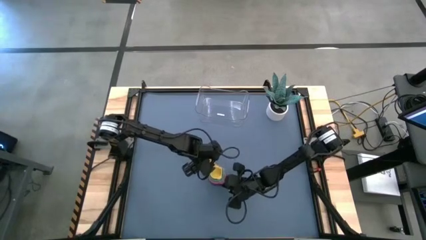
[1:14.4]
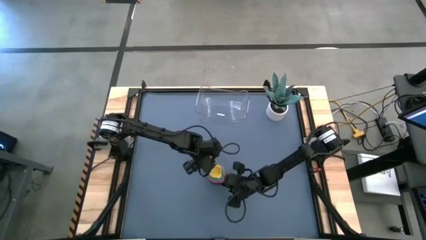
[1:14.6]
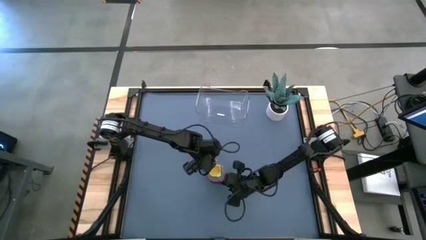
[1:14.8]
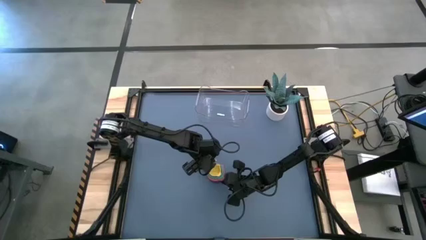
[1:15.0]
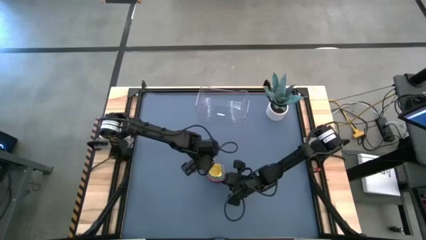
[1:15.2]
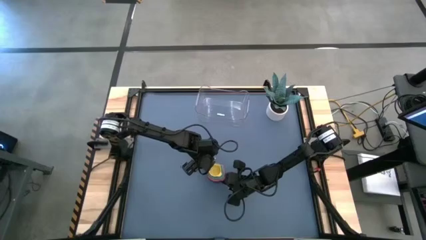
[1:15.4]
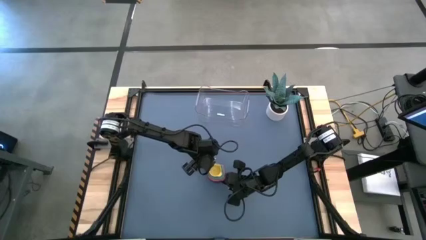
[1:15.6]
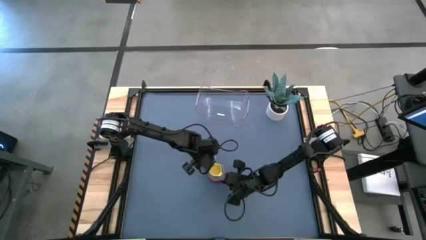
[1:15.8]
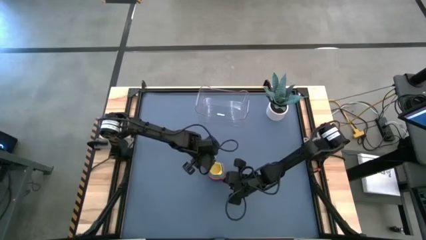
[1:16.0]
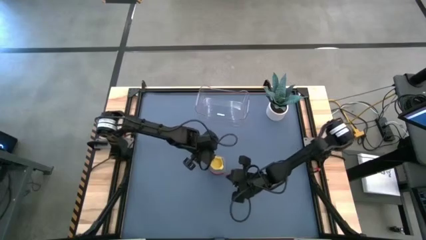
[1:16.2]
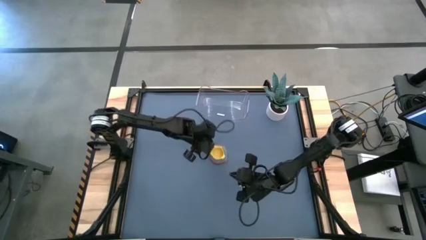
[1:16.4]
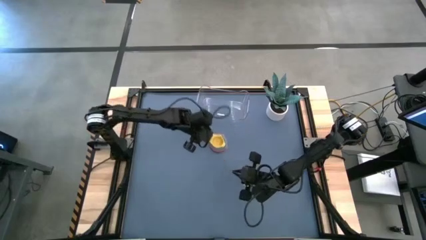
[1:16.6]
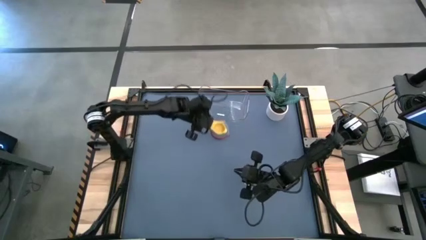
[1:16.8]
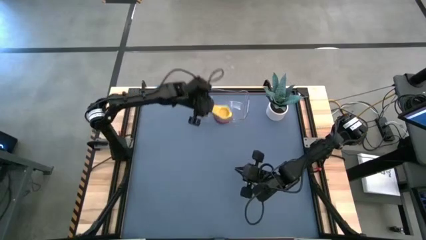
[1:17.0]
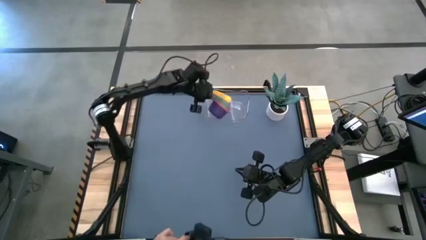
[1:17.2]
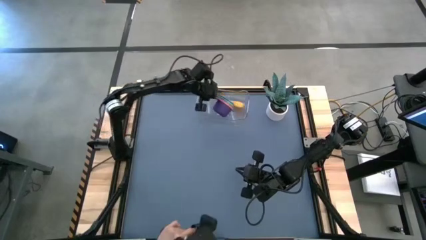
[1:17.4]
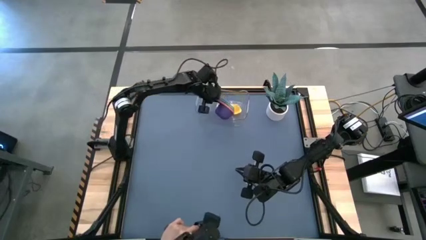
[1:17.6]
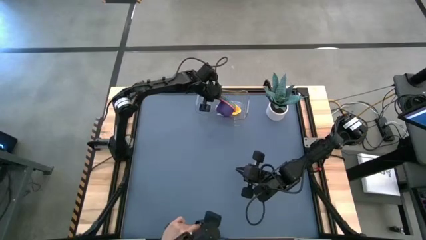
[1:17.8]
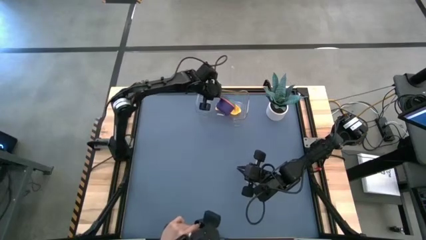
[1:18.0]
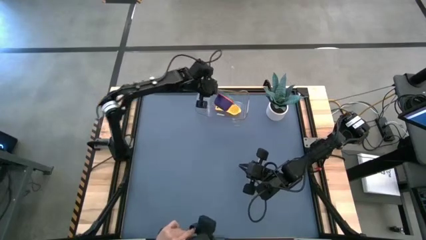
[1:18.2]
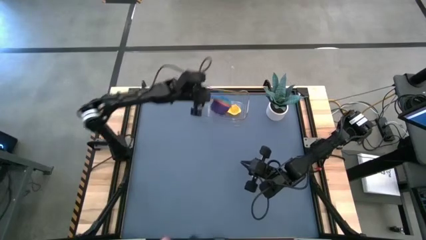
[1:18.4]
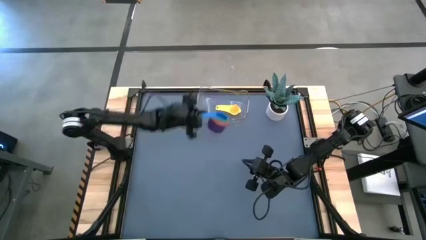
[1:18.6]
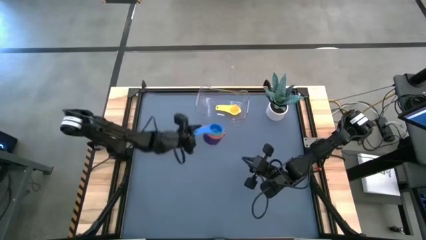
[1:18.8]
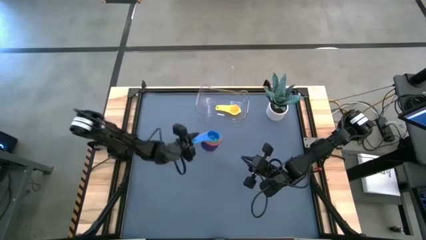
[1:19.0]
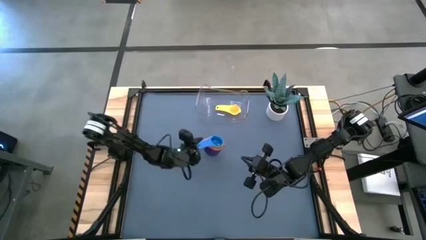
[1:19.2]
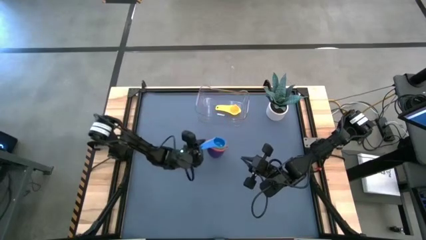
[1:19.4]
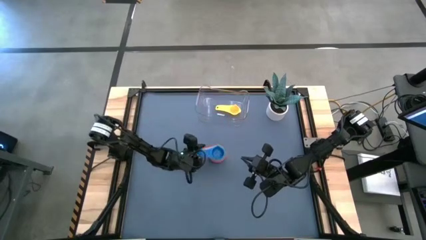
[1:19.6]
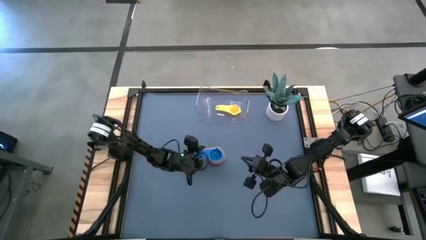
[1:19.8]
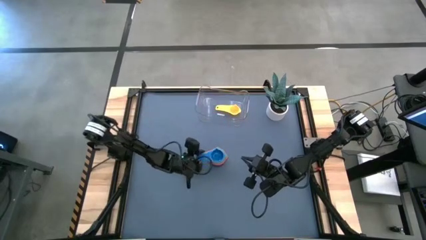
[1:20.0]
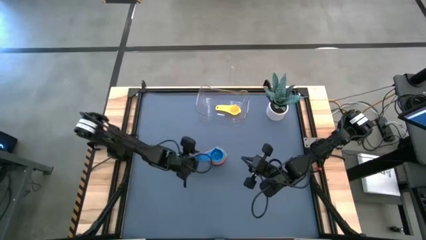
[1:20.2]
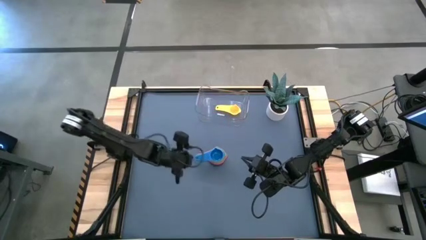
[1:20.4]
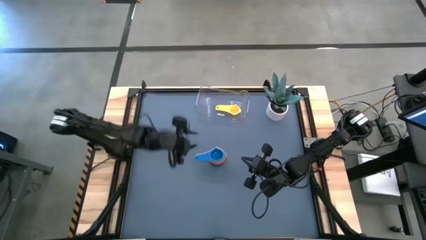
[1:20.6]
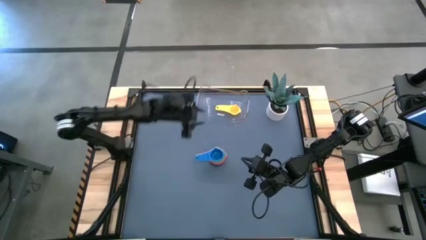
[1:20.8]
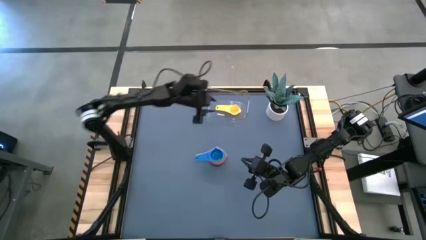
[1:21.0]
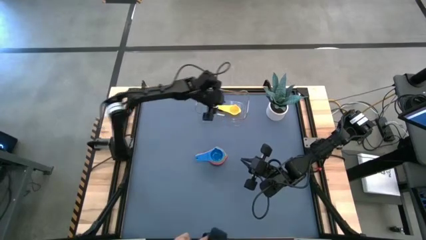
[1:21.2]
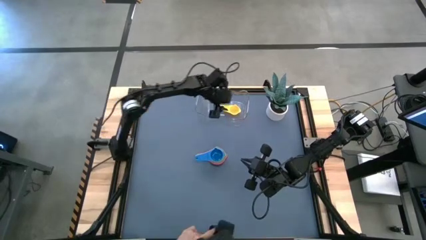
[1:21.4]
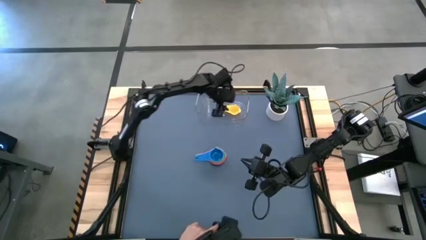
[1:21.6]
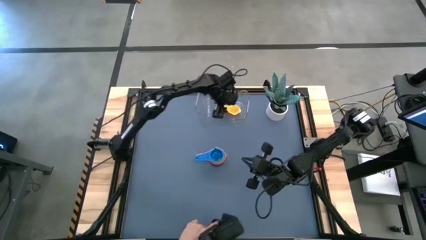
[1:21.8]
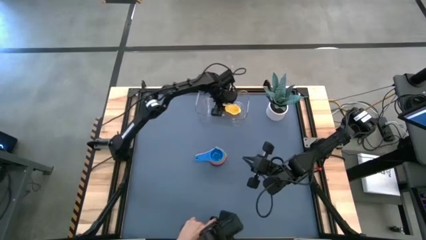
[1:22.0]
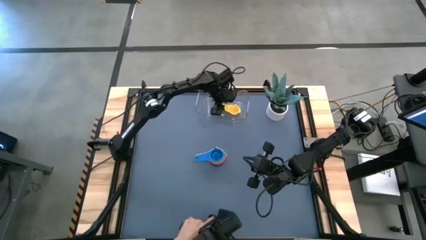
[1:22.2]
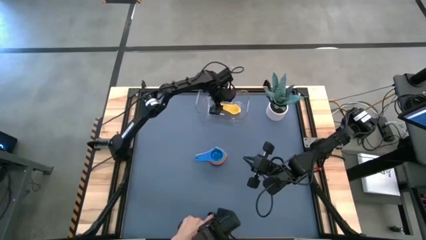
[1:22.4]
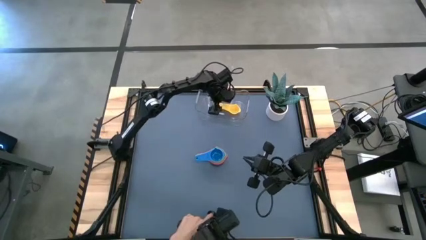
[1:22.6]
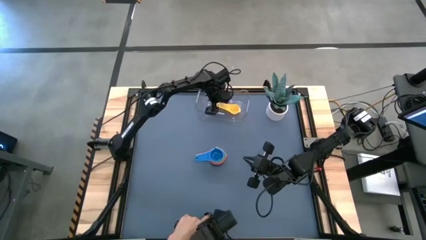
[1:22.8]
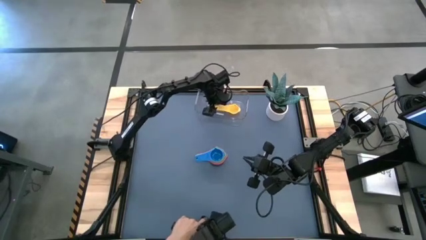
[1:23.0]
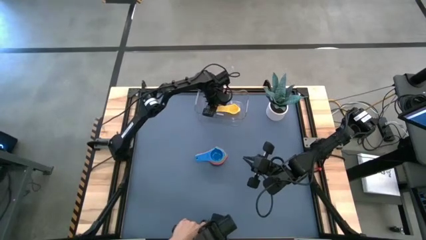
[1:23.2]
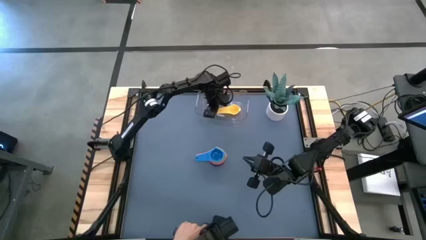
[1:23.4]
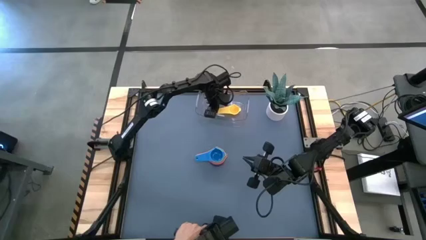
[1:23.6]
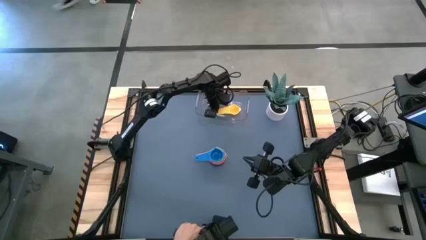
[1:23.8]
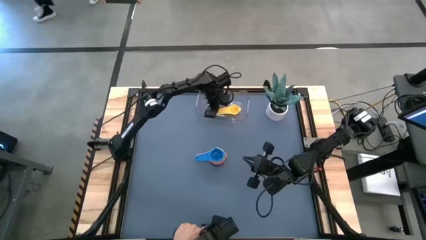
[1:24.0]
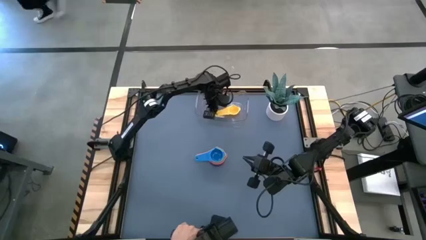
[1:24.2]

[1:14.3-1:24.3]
Task: Nest measuring cups in basket
Put the nested measuring cups into the transparent bin

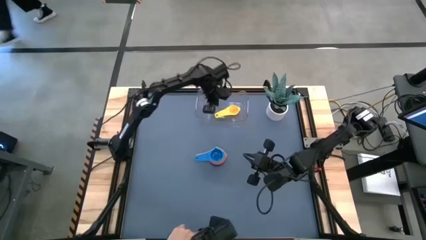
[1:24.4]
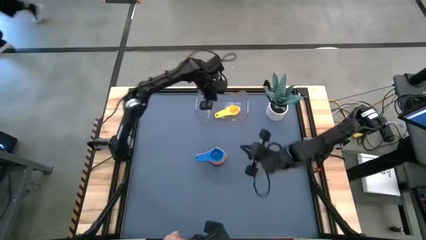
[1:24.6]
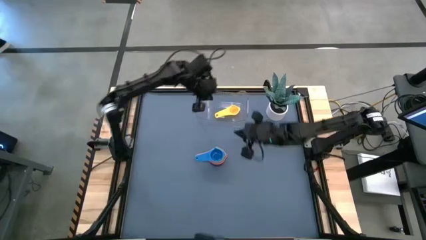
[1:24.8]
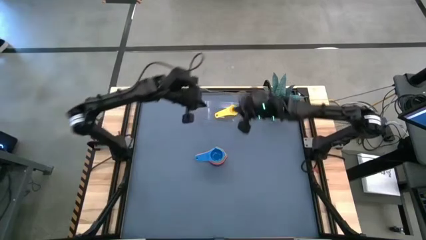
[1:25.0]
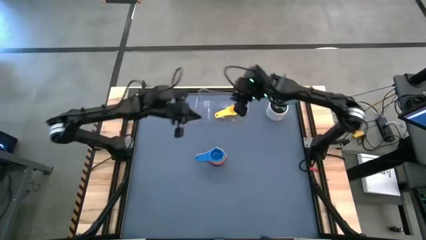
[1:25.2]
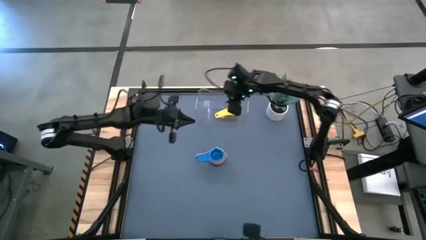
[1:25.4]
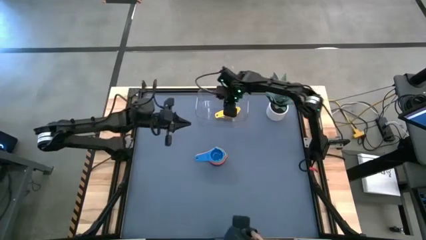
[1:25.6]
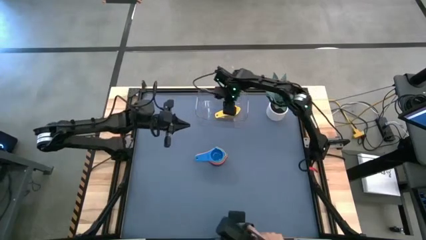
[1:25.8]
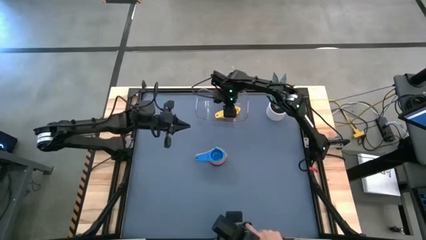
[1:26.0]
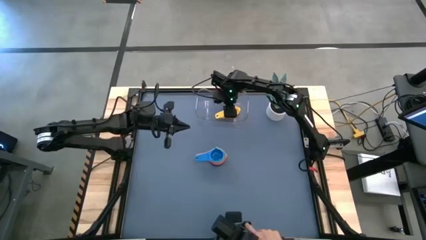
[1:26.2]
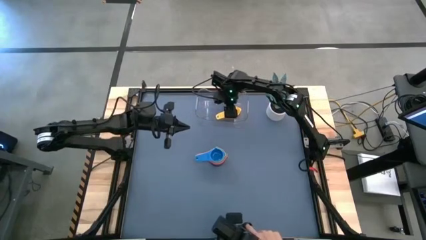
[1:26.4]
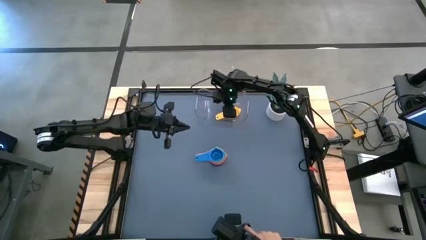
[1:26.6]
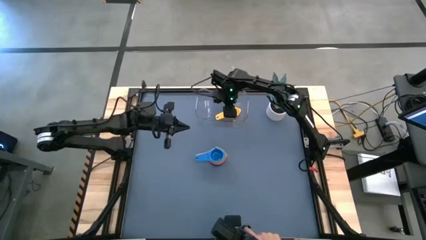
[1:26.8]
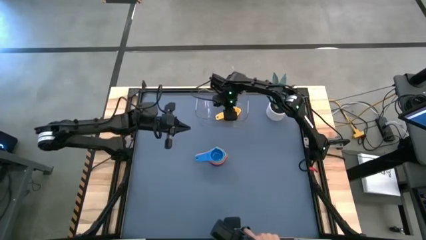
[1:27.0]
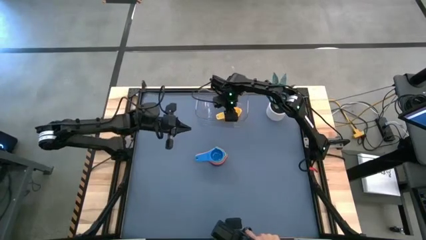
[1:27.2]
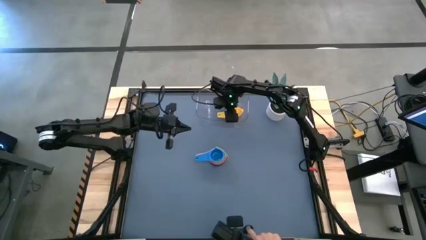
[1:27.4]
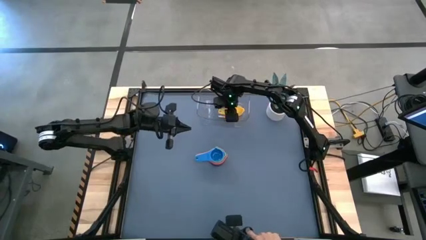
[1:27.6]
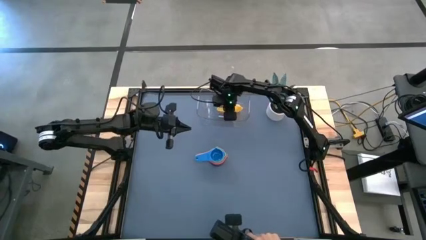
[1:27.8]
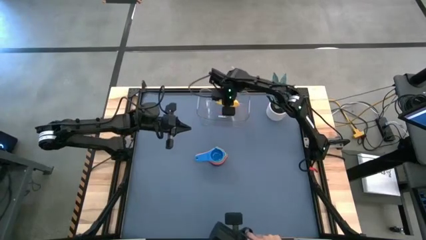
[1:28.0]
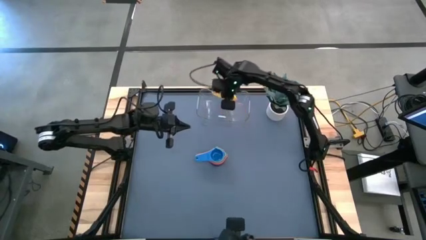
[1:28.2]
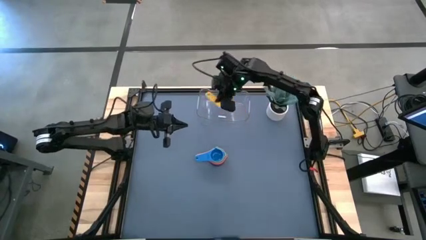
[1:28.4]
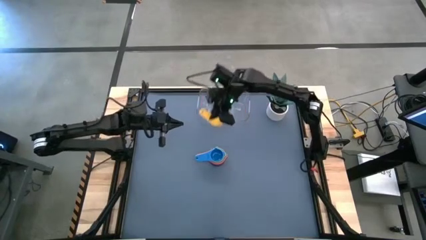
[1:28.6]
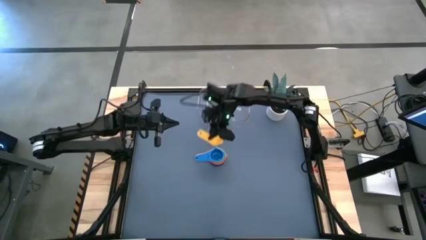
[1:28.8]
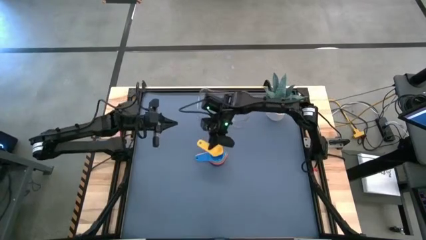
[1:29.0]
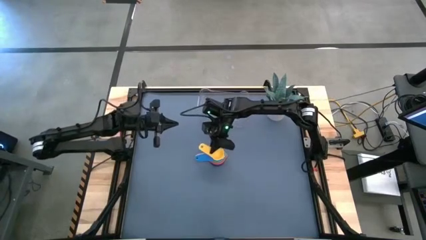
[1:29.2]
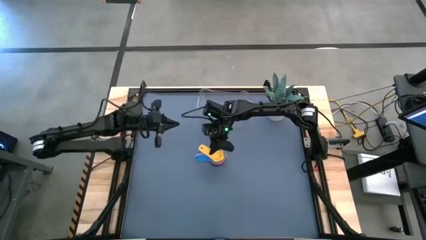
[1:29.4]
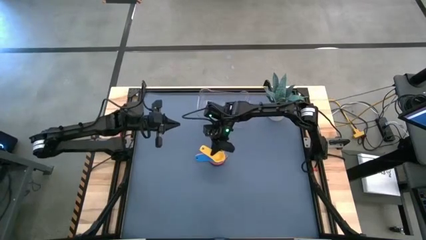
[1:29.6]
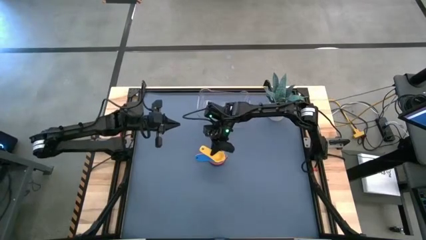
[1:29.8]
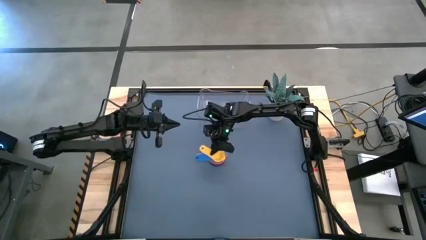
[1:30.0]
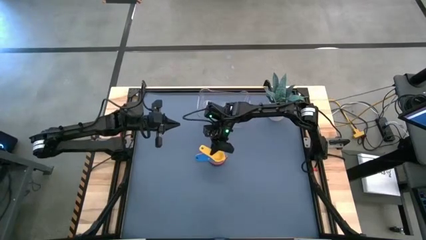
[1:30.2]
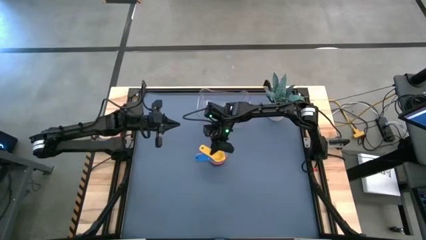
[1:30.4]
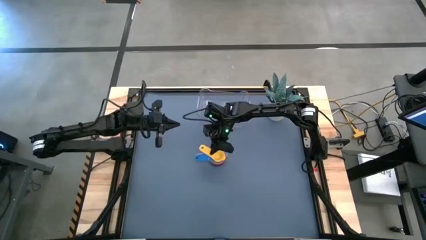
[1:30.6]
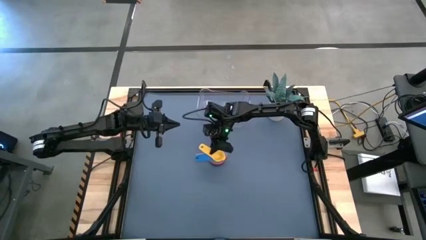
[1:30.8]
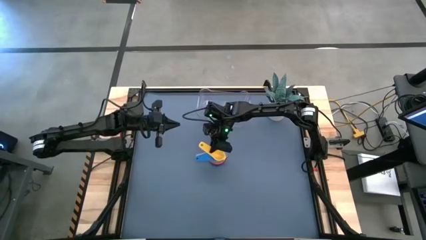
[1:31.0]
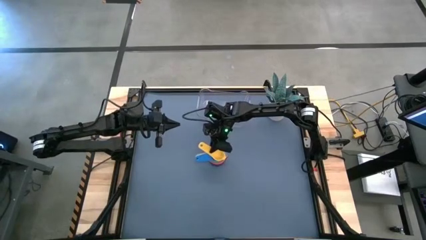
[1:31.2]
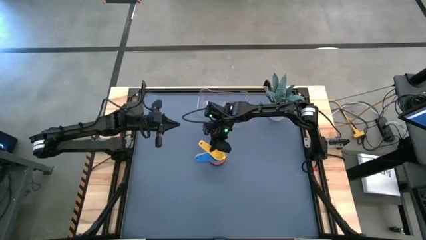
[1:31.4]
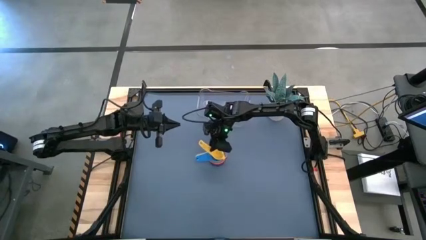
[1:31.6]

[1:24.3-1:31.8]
Stack the yellow measuring cup on top of the blue measuring cup
